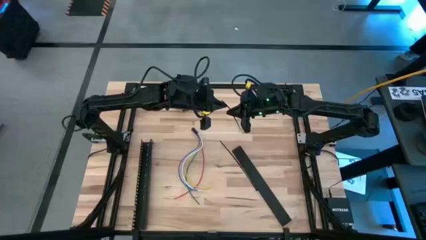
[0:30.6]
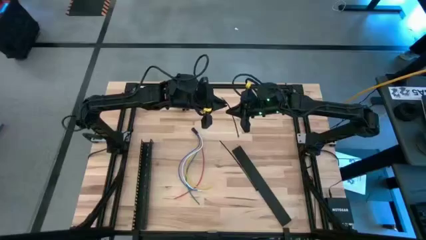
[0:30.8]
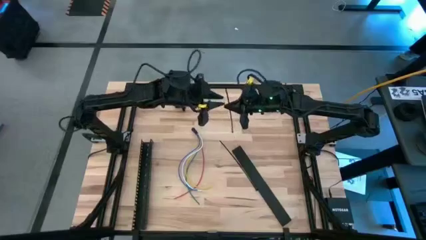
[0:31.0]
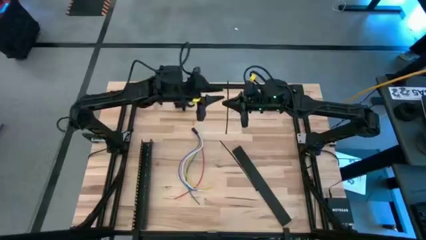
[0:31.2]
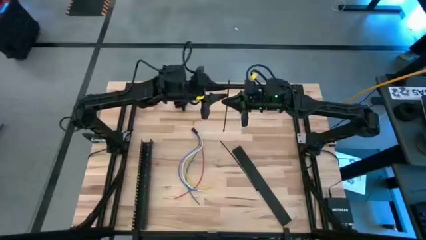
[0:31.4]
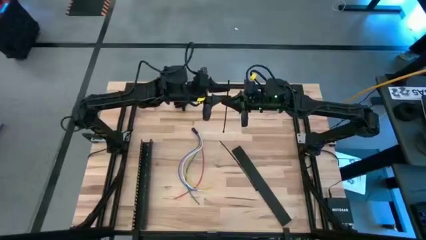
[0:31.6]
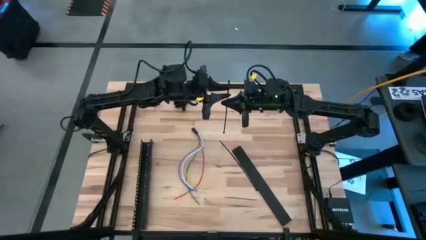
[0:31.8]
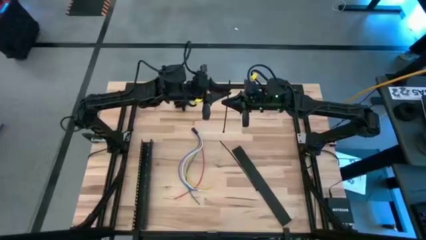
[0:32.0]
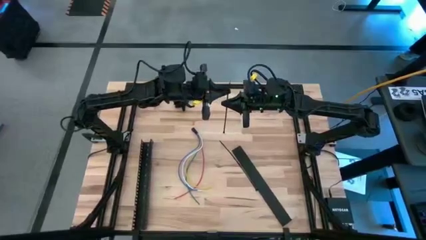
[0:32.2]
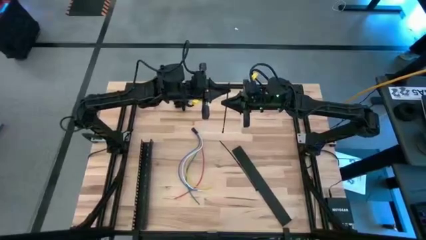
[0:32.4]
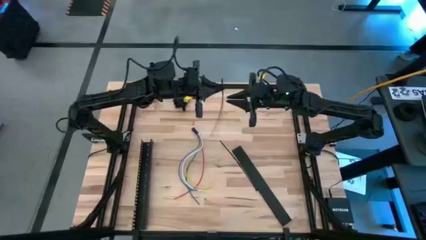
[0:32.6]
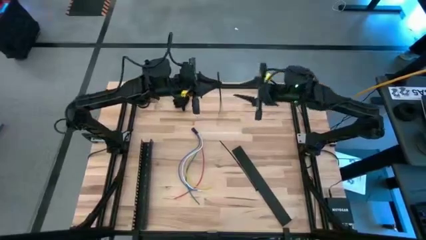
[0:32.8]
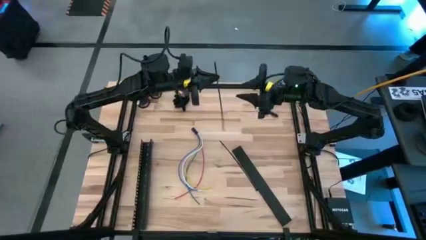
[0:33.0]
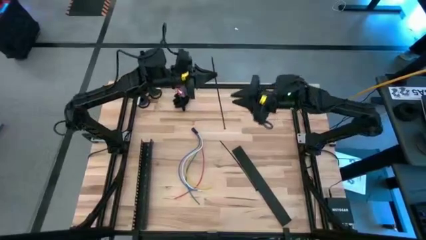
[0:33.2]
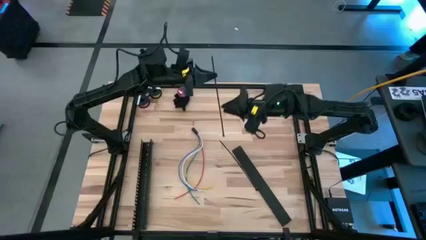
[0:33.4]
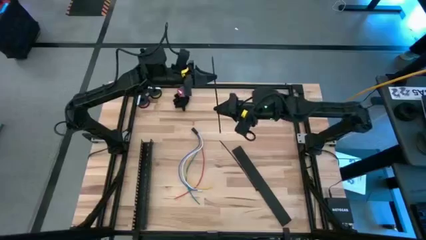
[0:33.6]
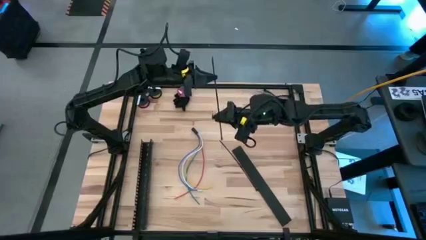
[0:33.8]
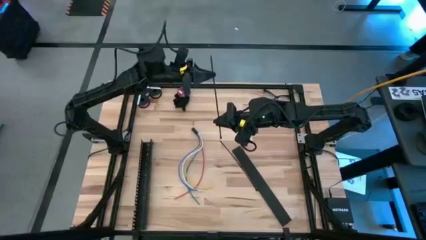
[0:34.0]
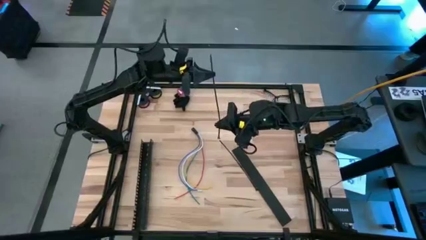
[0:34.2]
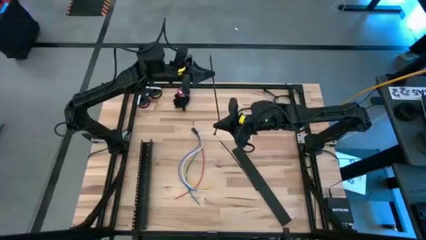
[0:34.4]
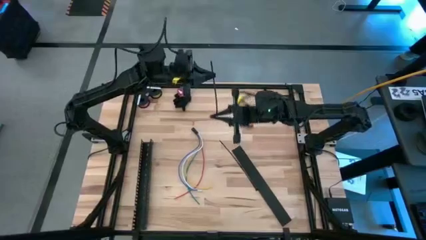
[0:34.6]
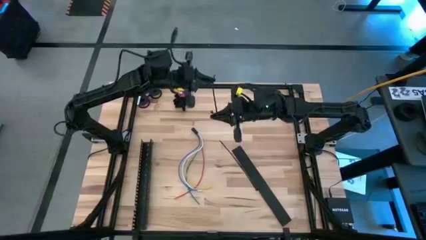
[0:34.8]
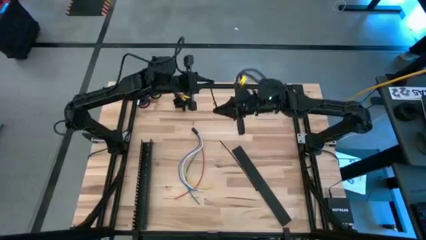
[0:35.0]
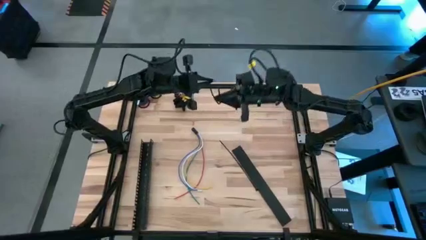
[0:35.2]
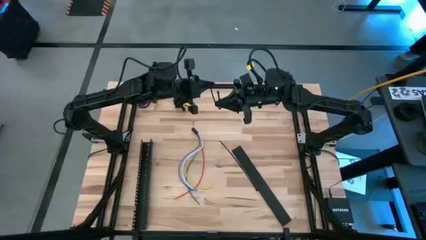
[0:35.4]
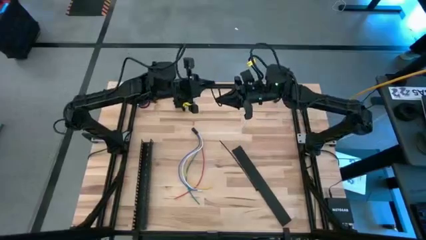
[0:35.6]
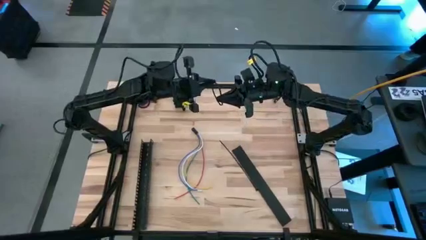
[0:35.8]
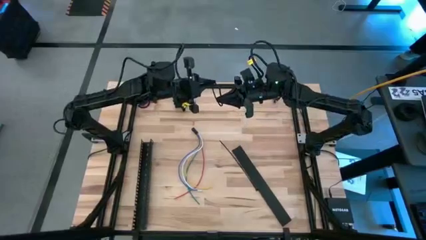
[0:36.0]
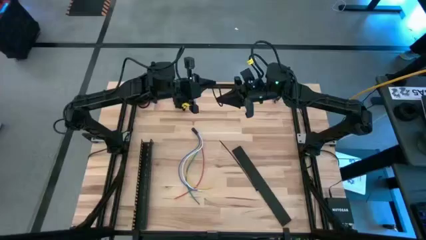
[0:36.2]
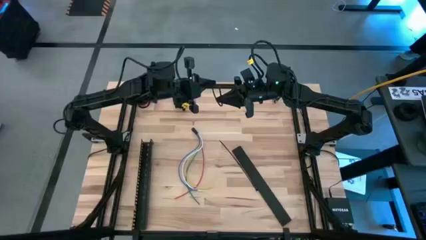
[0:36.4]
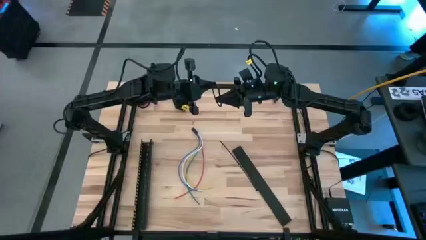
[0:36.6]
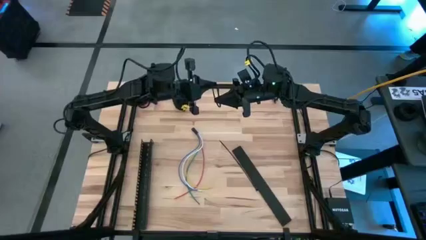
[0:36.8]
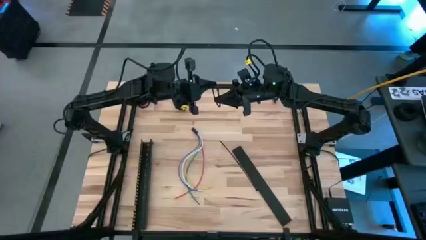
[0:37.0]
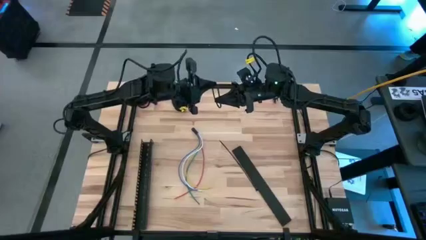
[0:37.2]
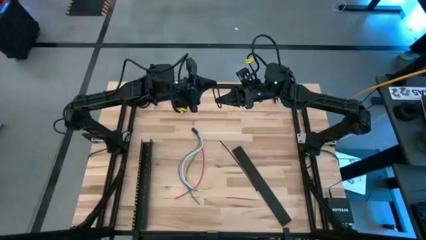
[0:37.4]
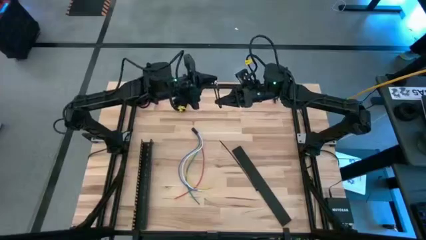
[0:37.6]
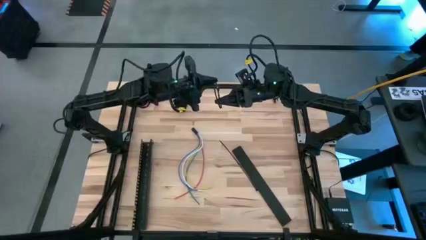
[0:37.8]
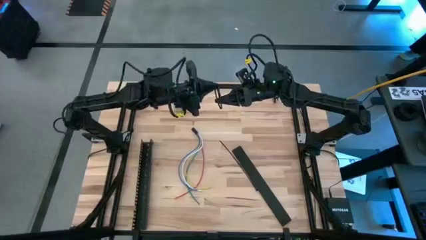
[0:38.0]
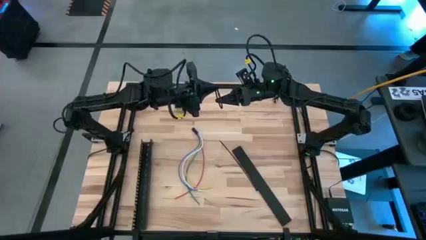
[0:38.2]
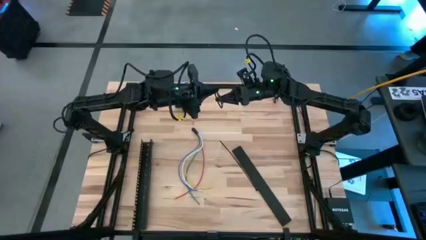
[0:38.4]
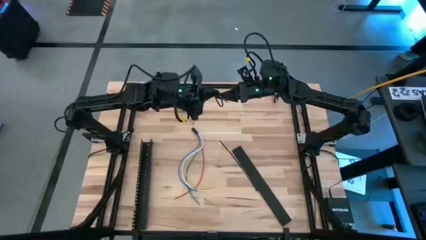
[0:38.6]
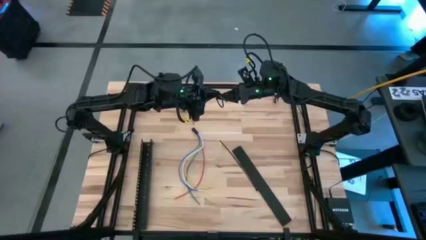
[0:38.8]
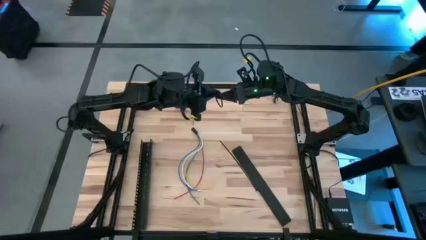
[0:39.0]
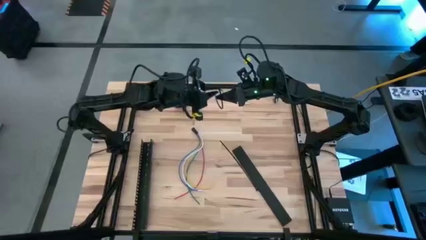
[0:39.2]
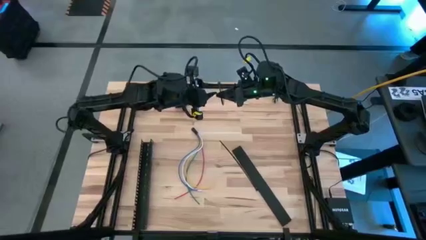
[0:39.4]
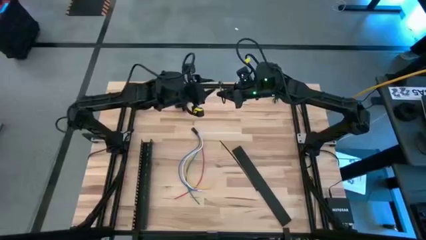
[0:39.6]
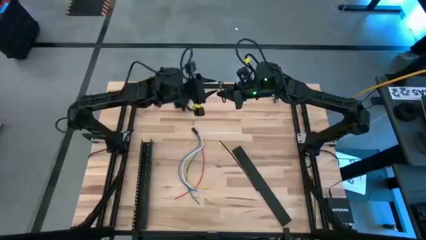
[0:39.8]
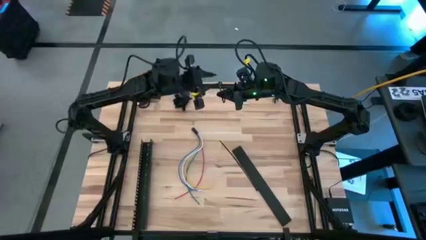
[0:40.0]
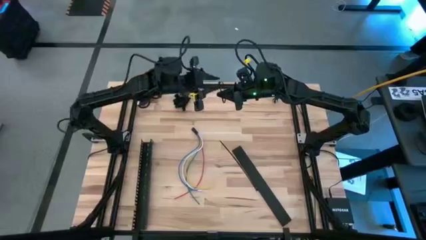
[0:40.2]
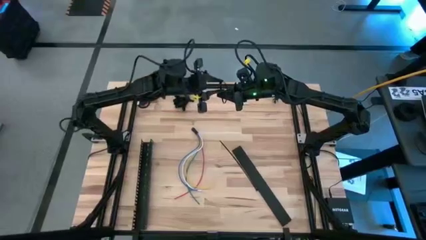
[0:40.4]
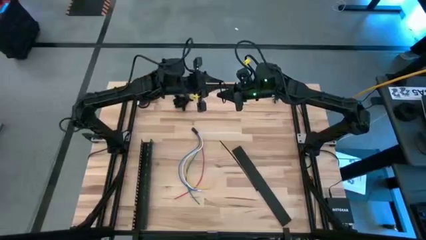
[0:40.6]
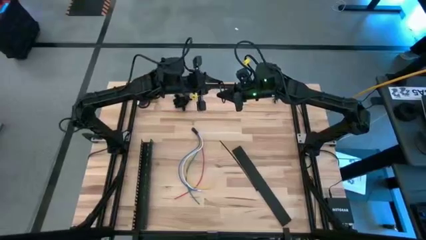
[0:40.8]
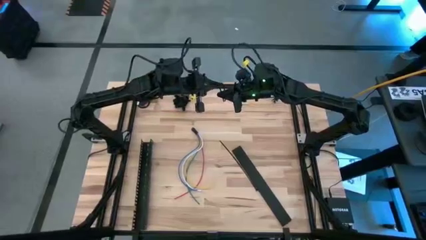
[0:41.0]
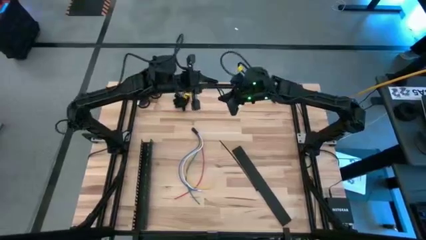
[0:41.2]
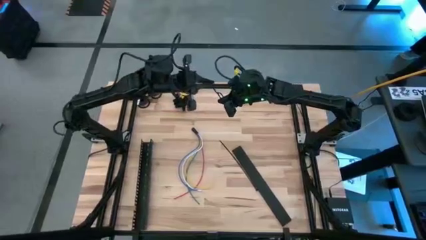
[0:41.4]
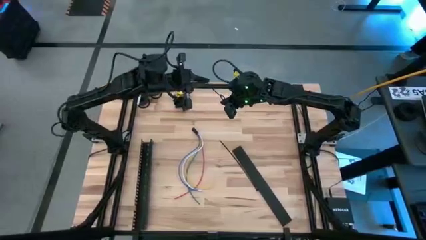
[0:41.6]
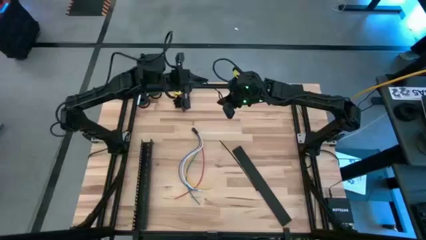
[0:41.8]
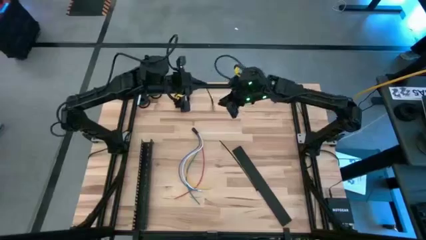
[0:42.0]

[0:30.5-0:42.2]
Task: Ziptie cables
Insert the left black zip tie tail into the locking head
